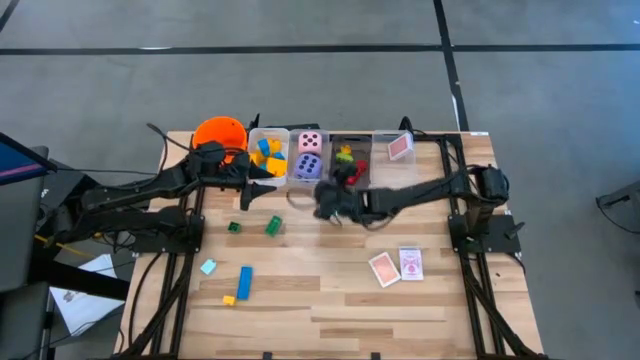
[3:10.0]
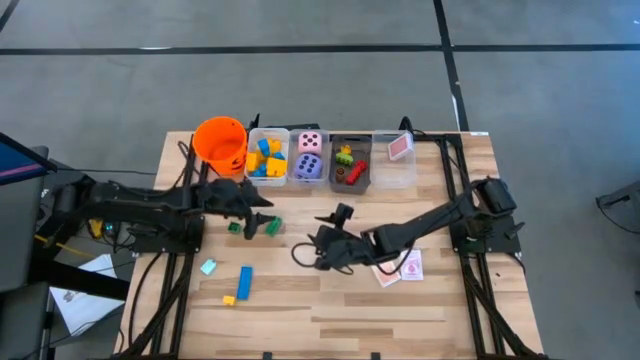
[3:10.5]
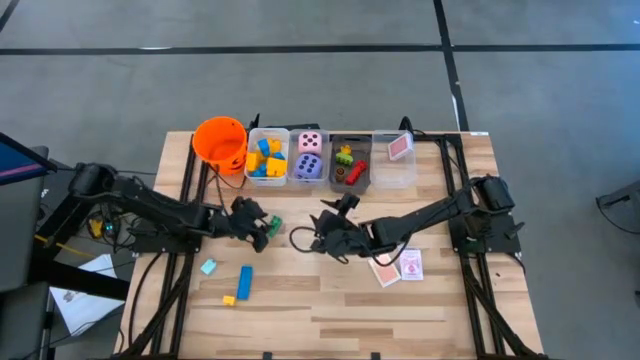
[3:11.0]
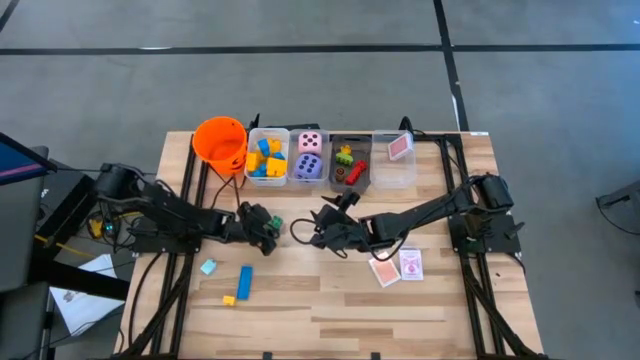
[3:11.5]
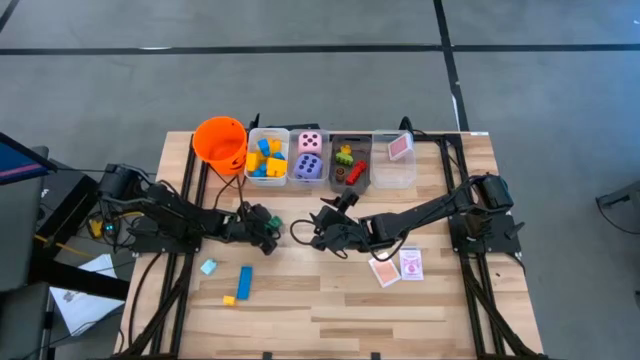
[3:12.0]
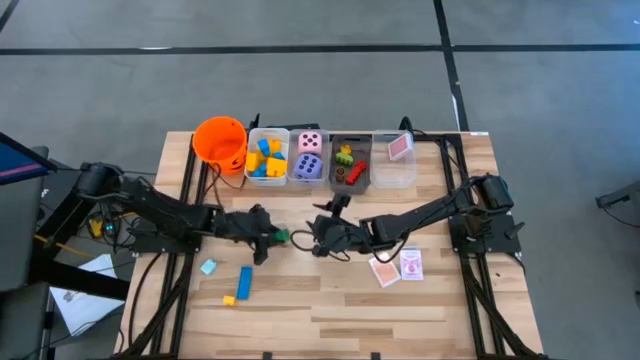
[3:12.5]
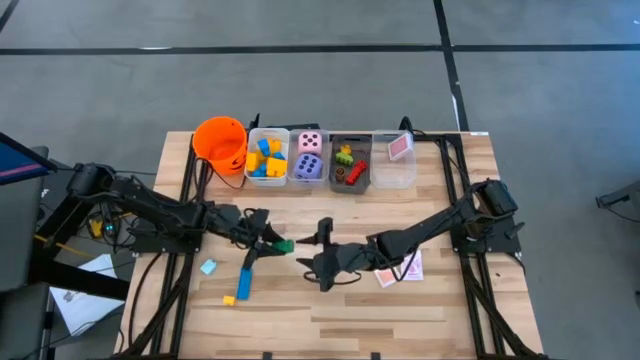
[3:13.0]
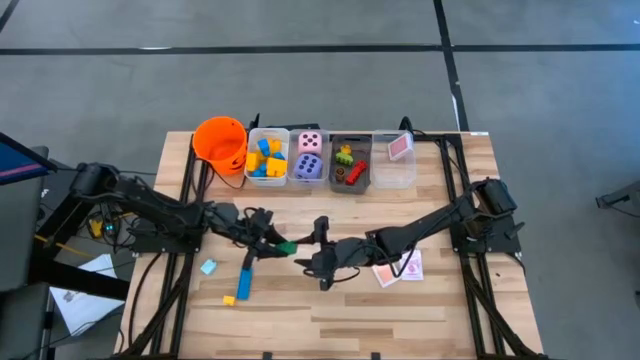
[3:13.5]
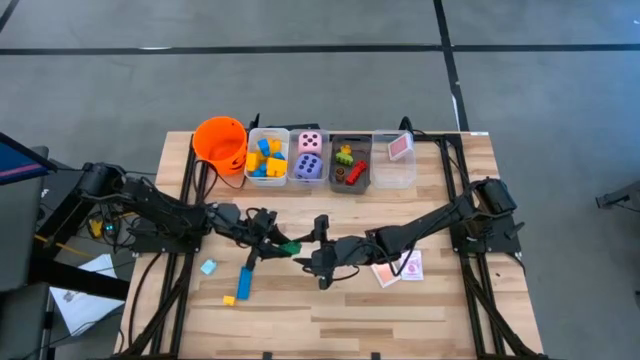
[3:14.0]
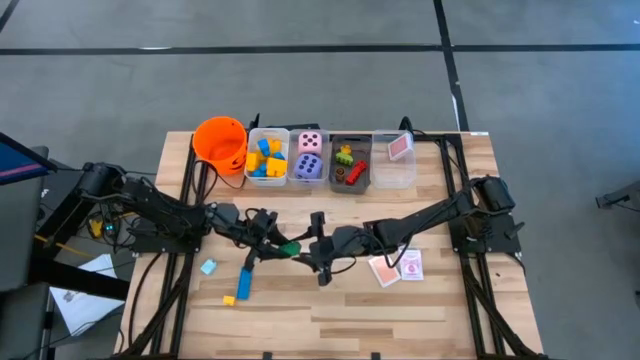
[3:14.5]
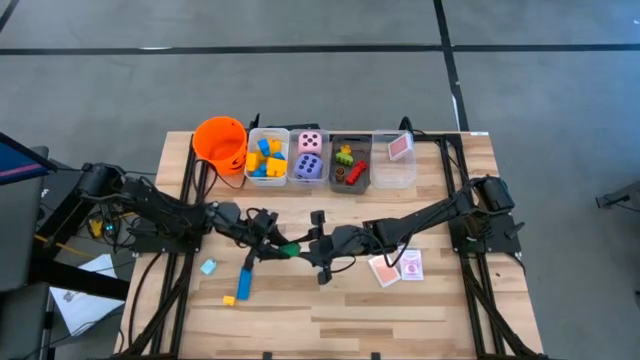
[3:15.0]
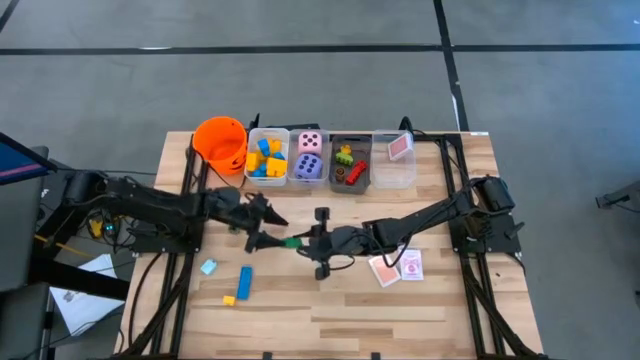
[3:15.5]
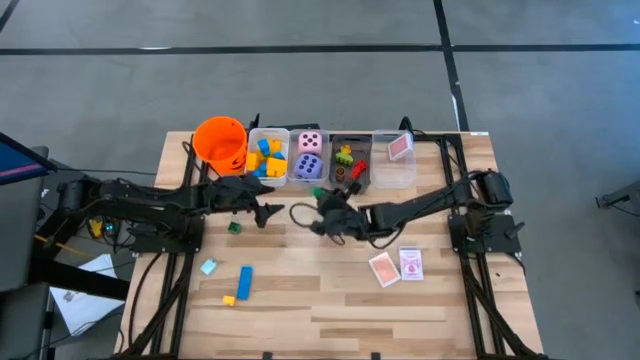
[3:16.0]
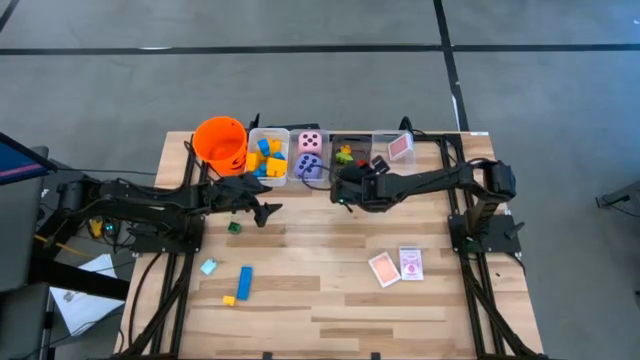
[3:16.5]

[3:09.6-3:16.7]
Task: Pick & Place Toys
Put the green game piece into the black bin

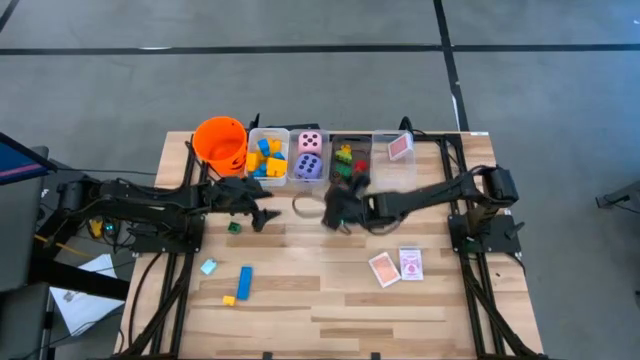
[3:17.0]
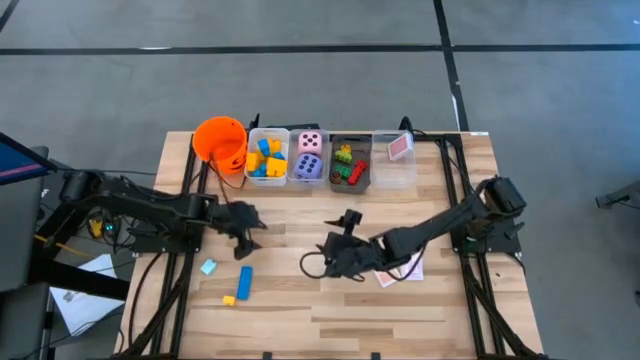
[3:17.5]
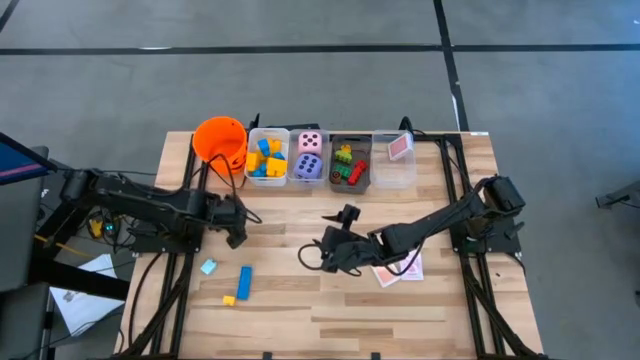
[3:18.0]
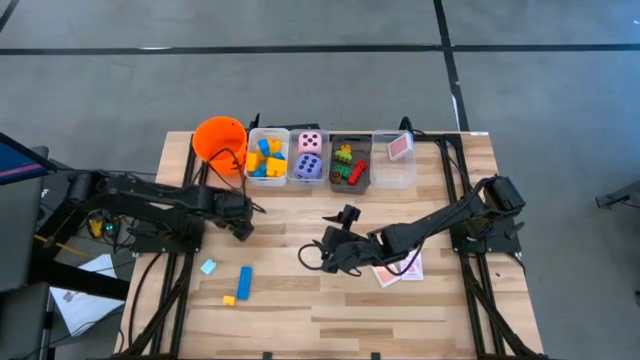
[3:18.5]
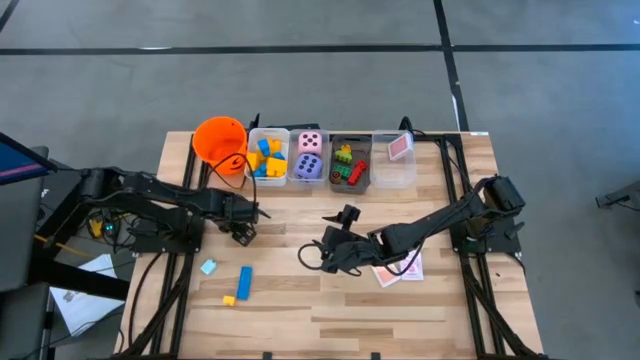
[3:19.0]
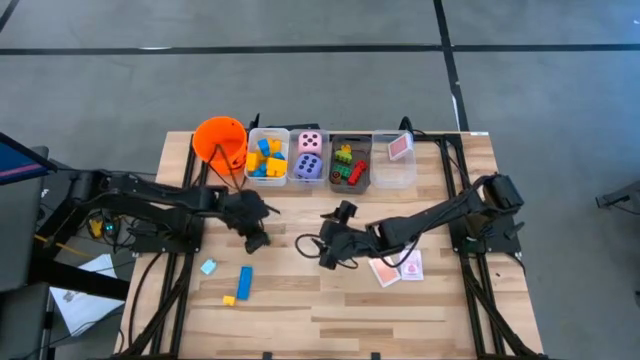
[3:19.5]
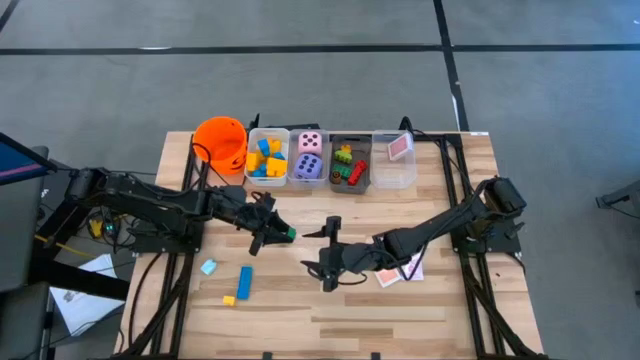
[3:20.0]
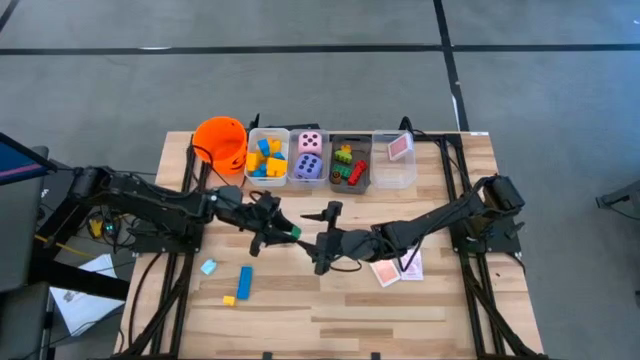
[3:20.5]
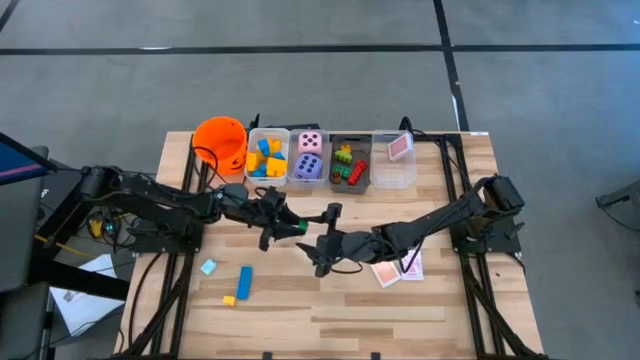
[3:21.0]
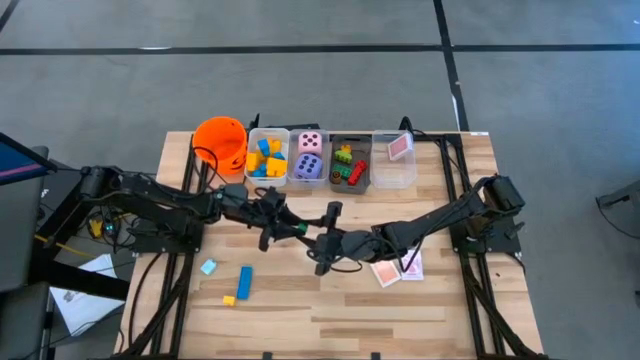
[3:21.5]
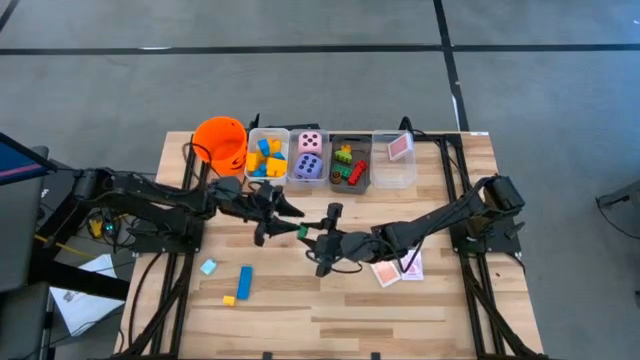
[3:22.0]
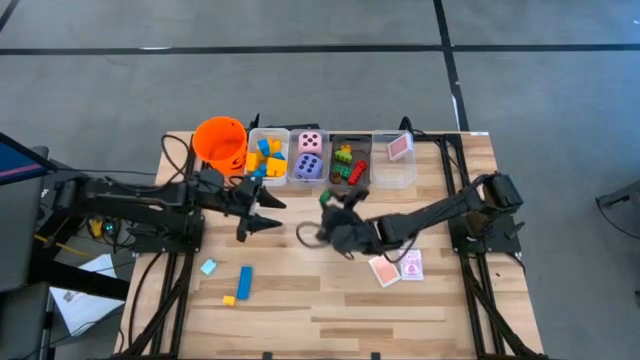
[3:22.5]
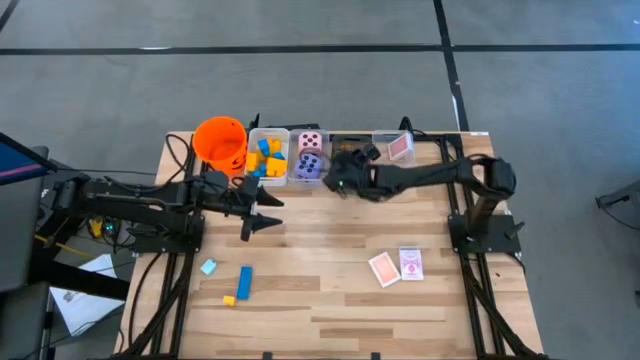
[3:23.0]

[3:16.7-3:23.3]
Put the green game piece into the black bin

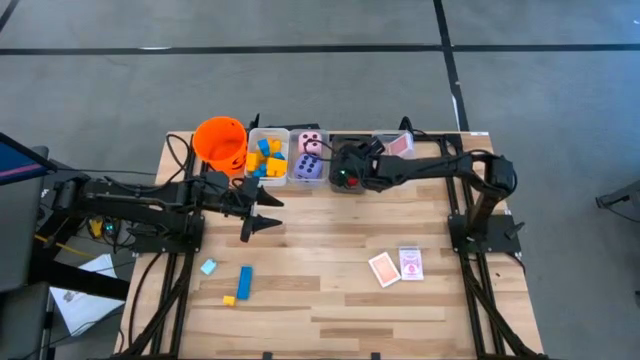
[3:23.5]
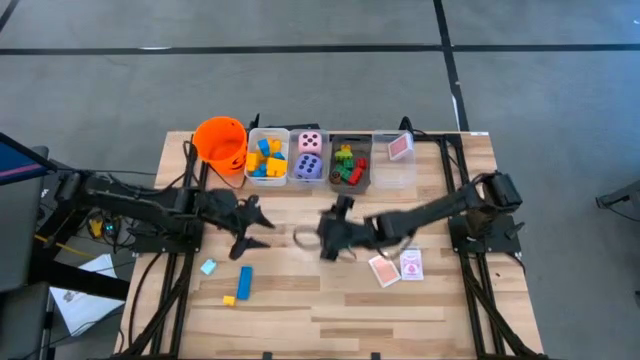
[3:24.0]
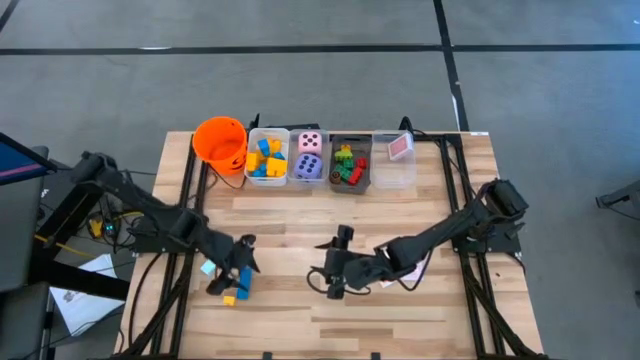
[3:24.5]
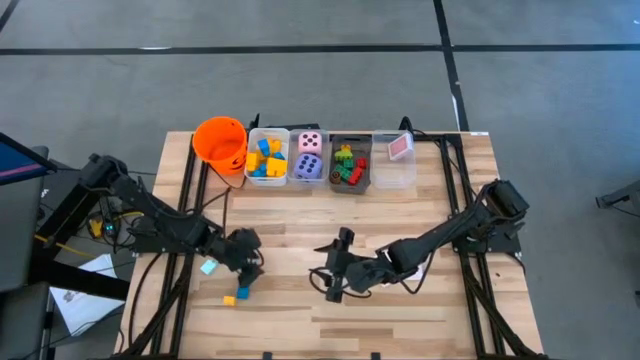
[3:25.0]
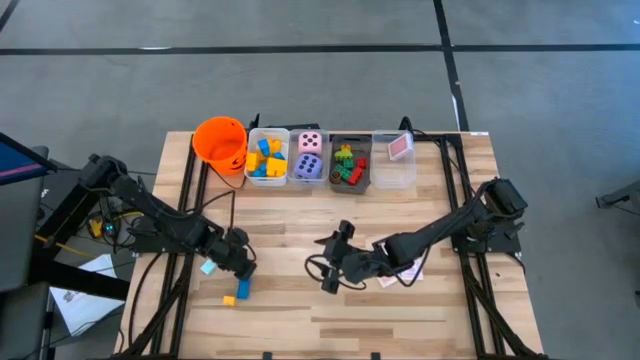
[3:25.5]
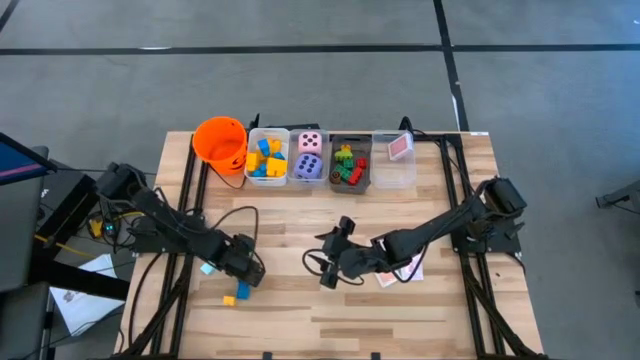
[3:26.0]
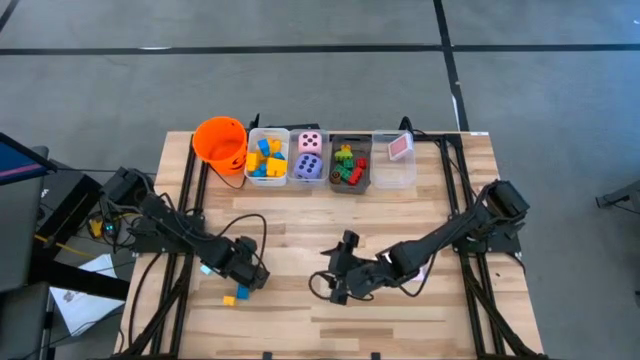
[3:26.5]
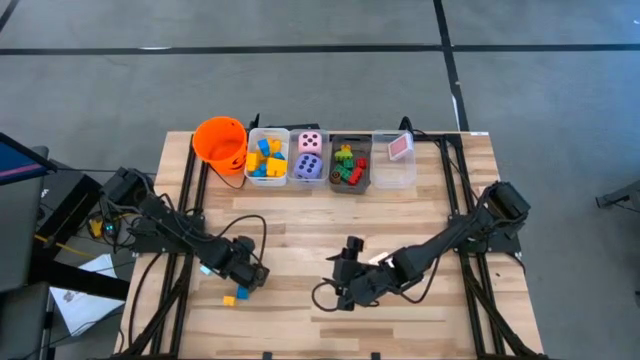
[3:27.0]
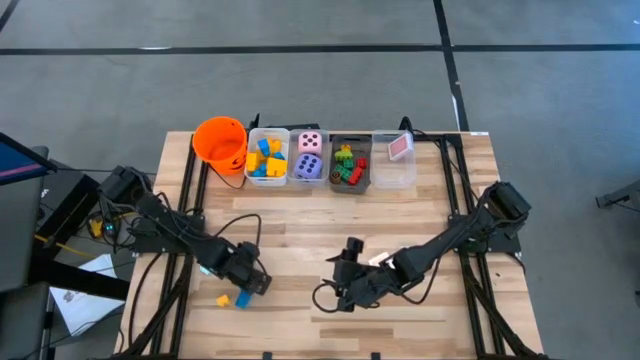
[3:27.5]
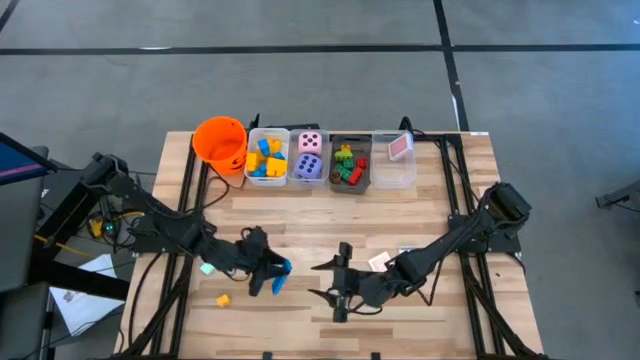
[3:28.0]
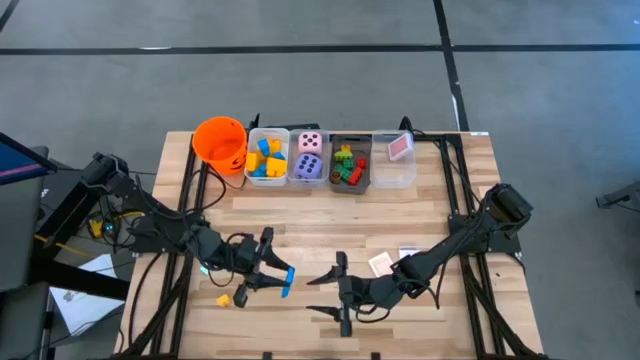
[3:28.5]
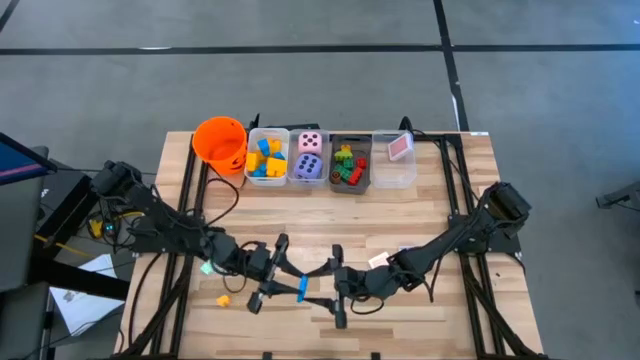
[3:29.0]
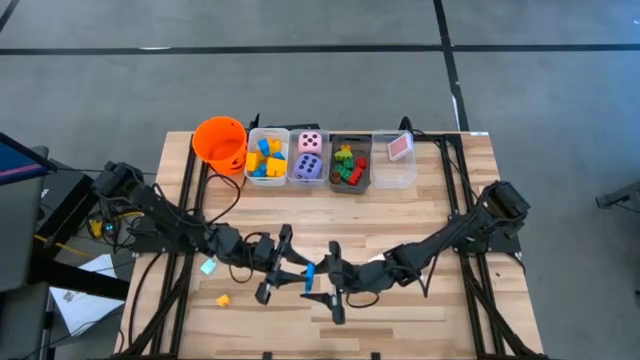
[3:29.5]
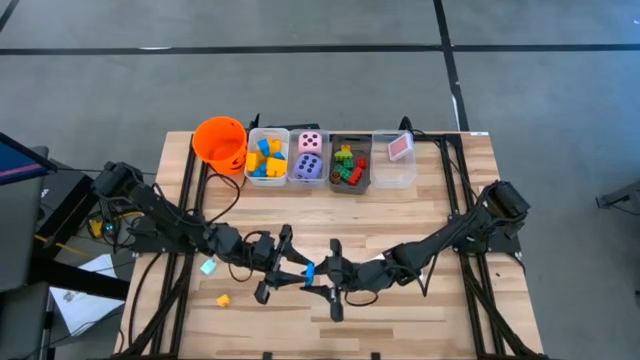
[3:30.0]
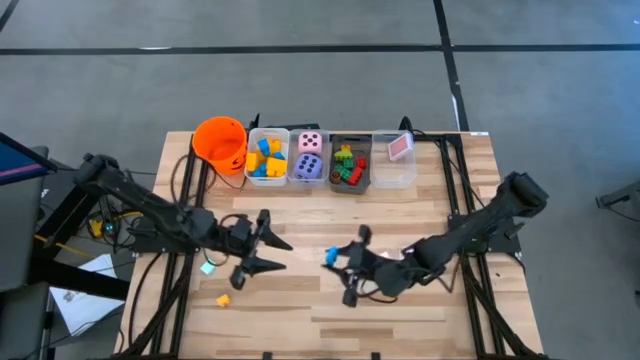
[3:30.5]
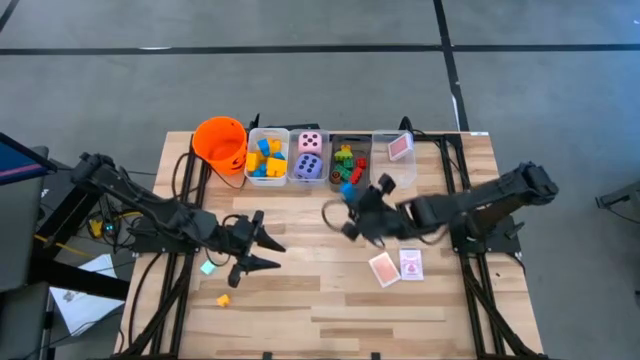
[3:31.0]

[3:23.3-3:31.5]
Put the blue game piece into the black bin
